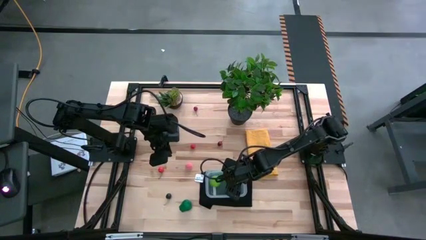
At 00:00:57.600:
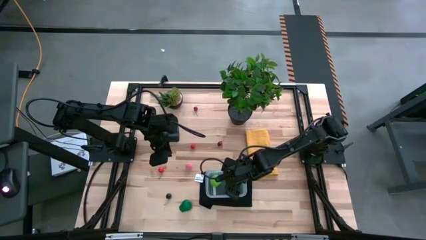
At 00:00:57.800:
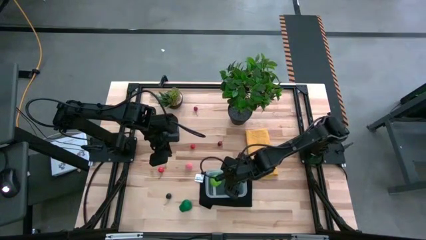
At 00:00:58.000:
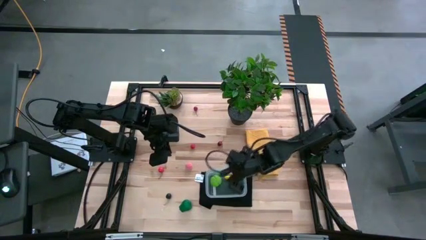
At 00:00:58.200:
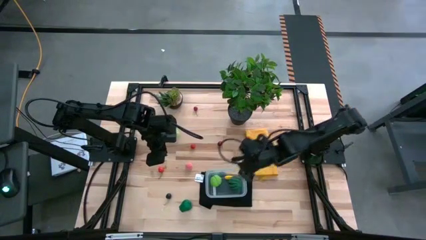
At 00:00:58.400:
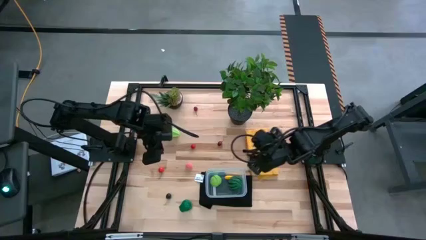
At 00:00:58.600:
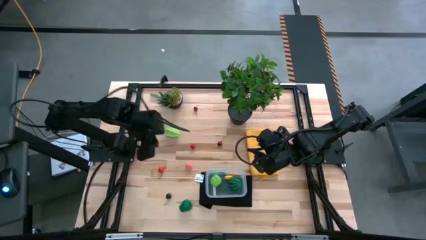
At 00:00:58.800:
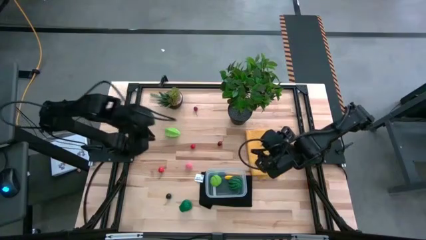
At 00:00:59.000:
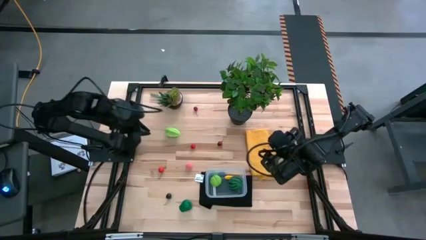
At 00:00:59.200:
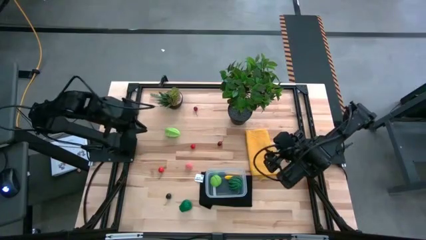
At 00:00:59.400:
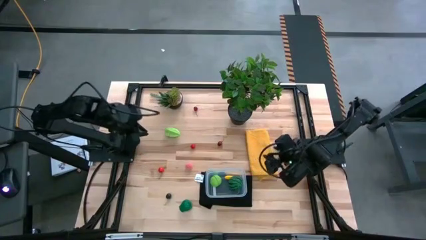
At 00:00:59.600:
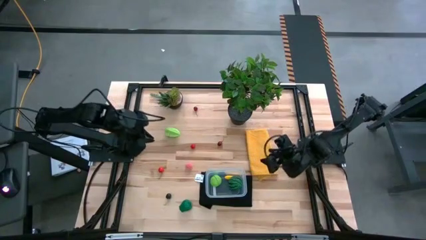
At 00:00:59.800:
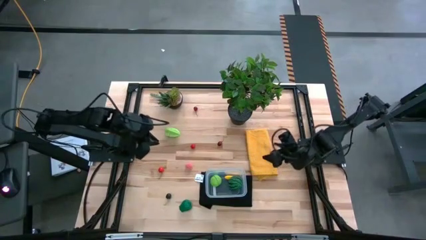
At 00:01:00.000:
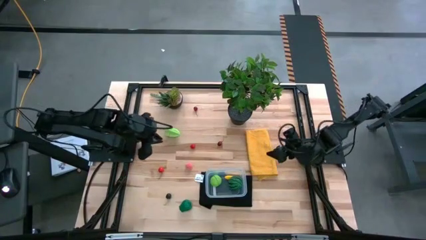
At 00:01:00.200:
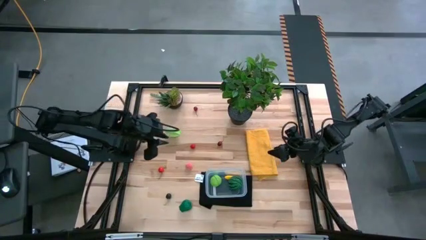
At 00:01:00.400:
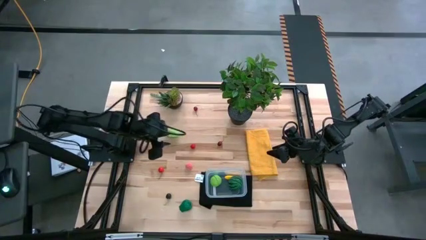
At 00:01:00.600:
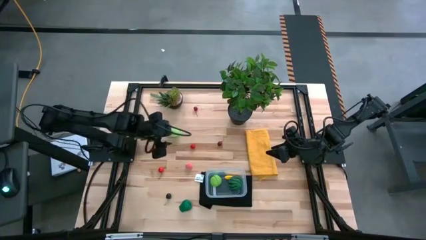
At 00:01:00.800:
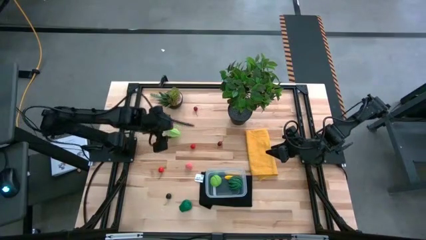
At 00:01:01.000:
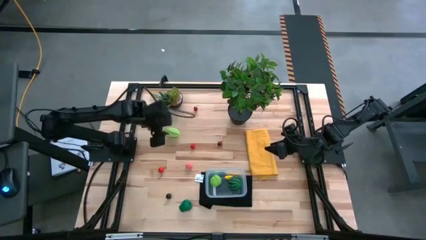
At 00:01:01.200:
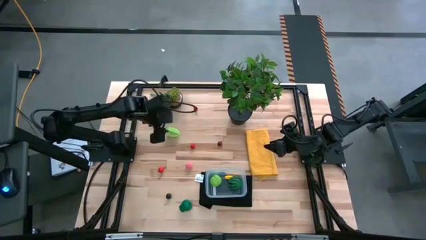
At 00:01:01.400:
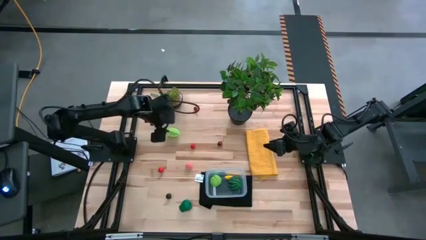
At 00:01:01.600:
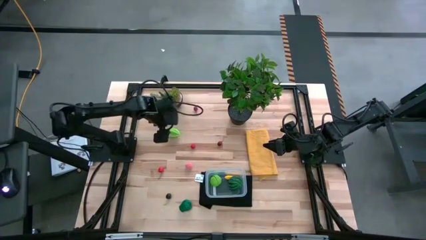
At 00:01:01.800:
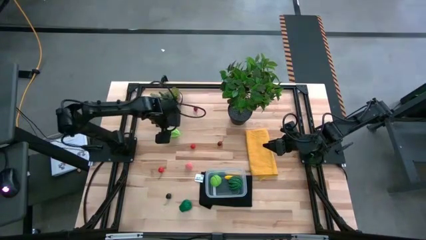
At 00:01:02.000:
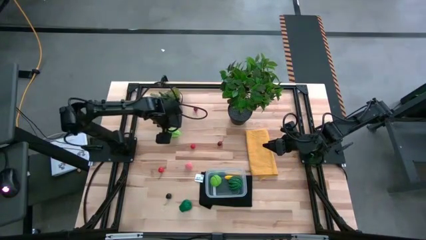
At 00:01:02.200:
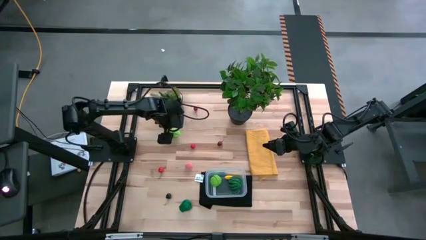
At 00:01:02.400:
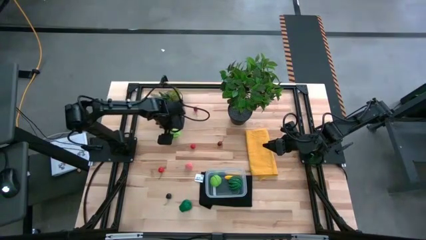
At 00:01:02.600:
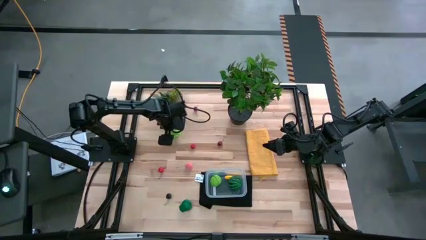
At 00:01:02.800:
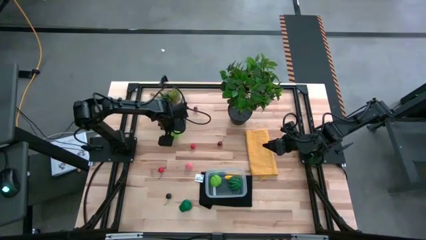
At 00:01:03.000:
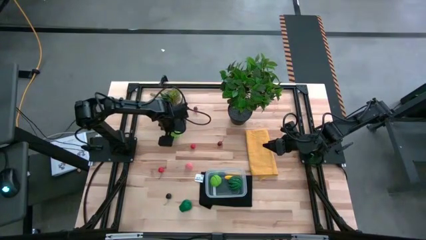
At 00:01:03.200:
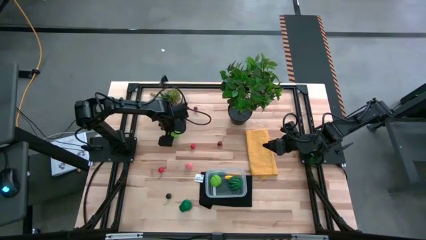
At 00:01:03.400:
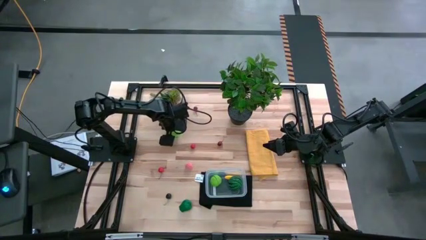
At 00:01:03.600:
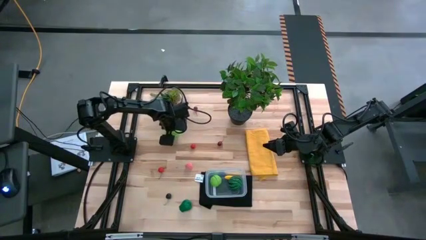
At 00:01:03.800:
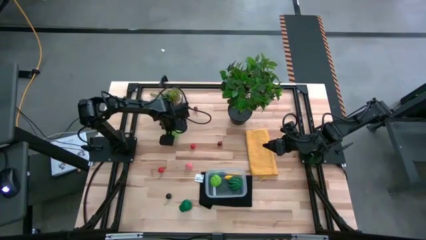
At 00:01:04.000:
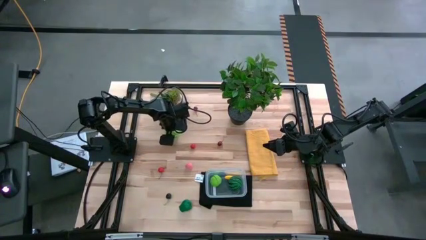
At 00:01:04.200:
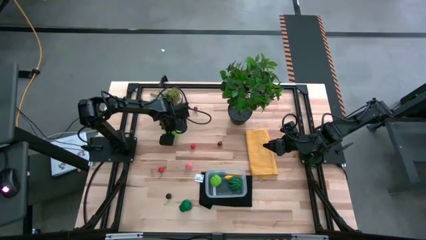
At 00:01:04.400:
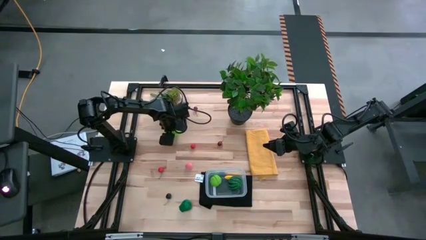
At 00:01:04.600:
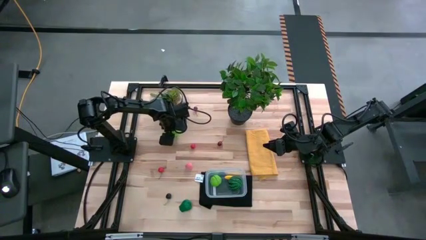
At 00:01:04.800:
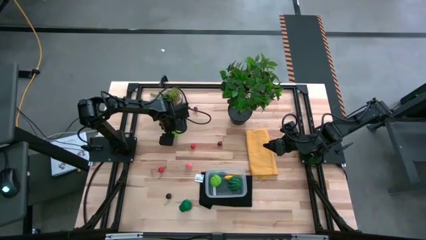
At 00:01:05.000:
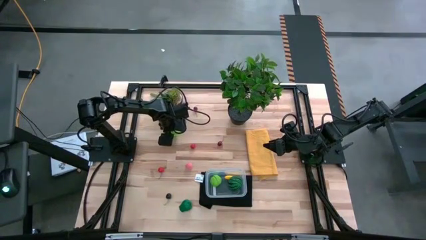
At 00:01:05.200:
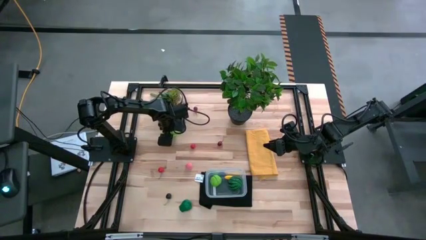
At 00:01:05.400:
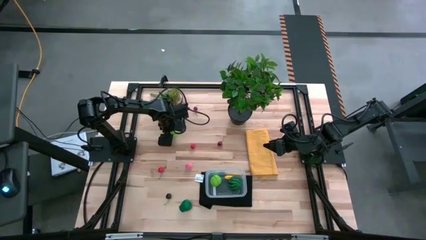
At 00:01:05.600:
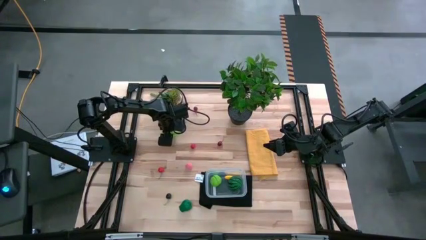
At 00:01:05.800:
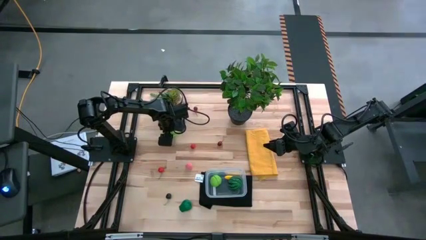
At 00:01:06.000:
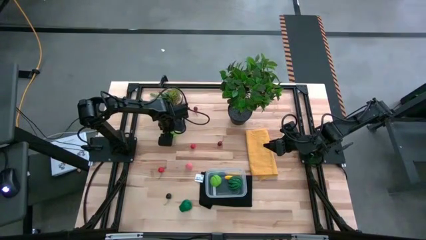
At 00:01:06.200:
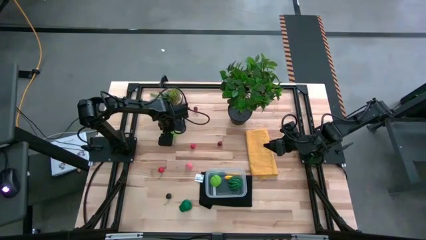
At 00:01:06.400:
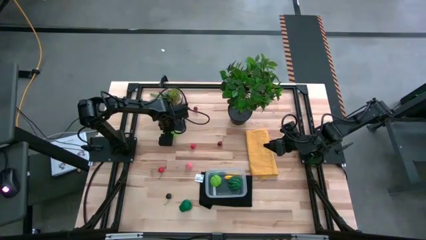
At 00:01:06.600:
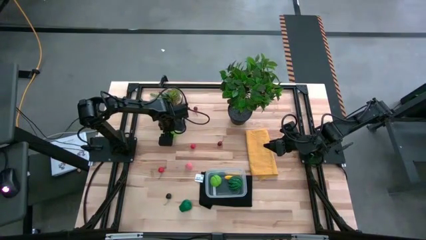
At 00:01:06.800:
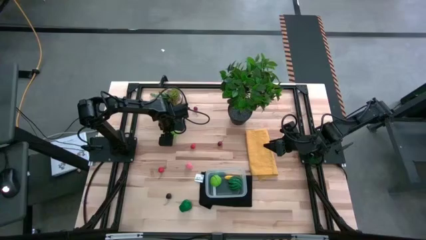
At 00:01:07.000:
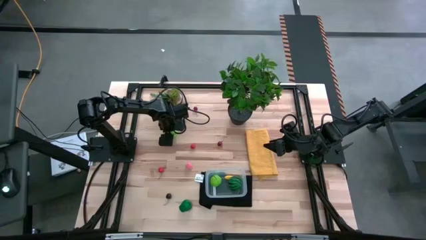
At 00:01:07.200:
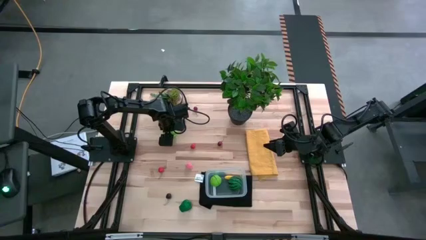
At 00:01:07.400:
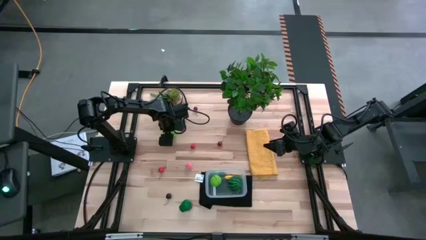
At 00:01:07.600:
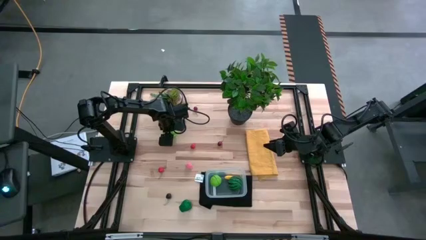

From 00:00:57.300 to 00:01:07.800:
Task: Pick and placing Produce into tupperware
Put the star fruit into the transparent bin

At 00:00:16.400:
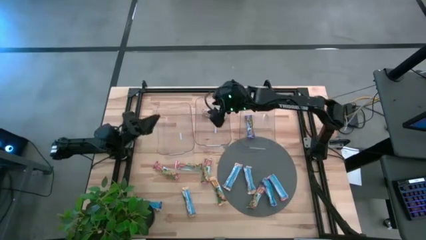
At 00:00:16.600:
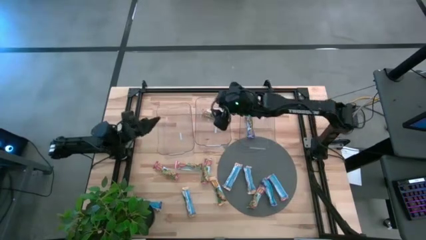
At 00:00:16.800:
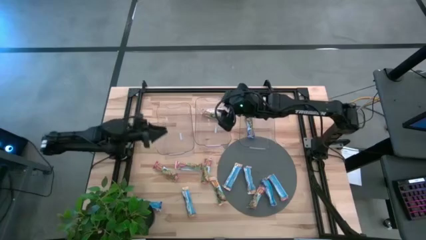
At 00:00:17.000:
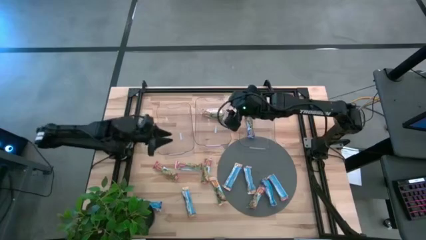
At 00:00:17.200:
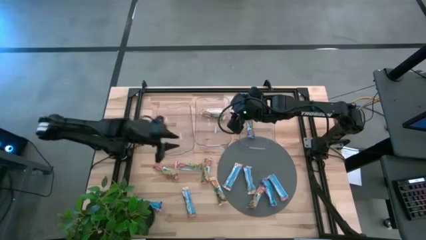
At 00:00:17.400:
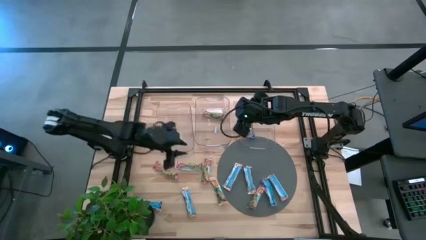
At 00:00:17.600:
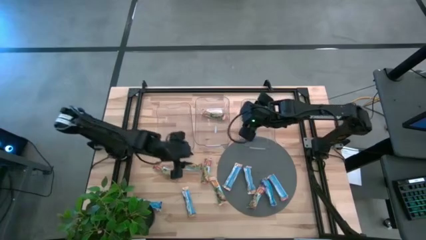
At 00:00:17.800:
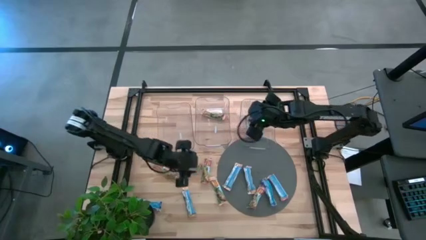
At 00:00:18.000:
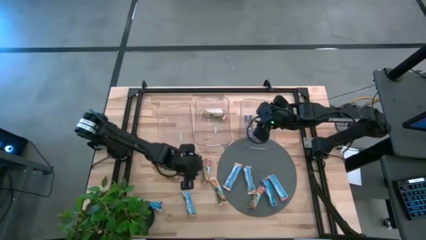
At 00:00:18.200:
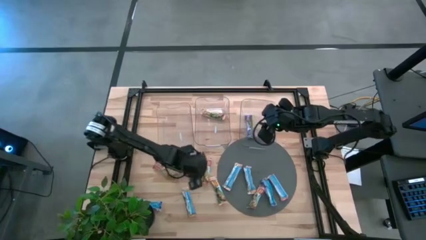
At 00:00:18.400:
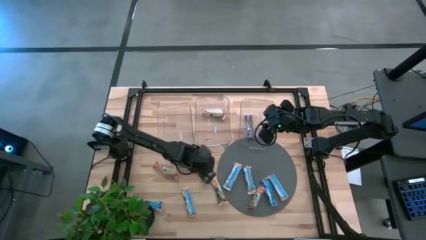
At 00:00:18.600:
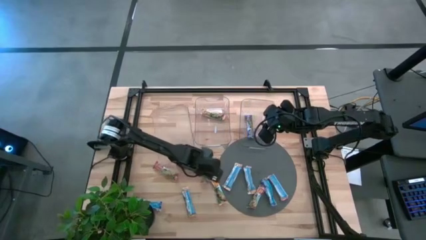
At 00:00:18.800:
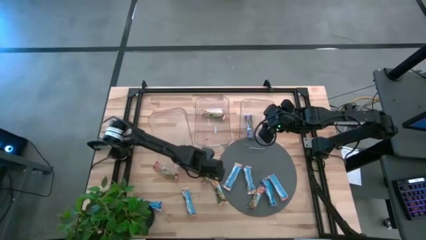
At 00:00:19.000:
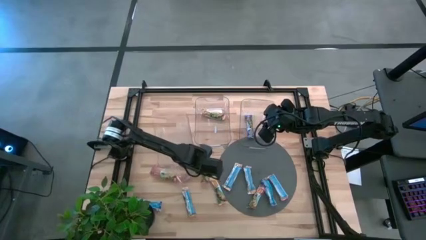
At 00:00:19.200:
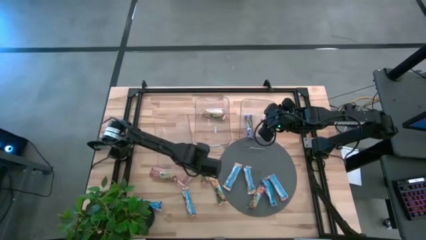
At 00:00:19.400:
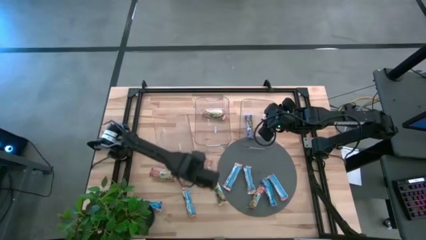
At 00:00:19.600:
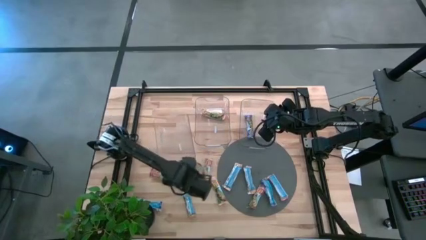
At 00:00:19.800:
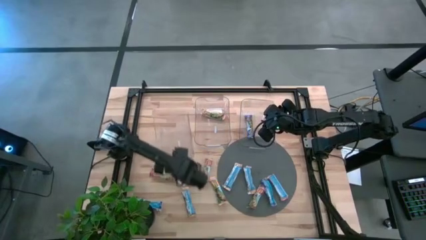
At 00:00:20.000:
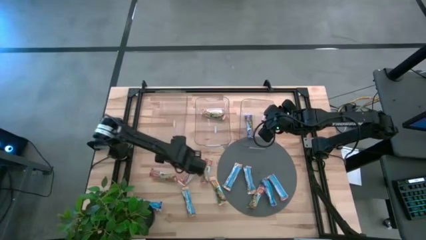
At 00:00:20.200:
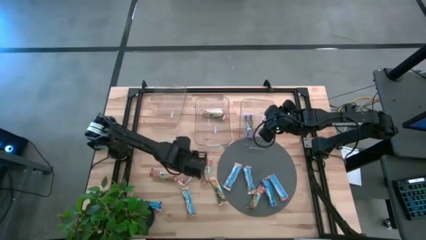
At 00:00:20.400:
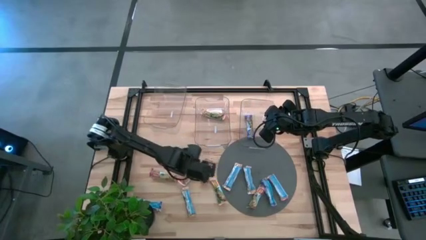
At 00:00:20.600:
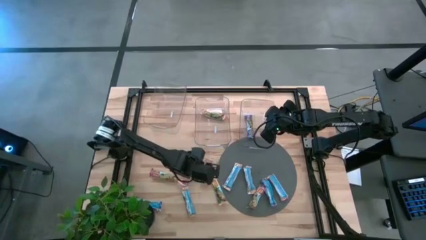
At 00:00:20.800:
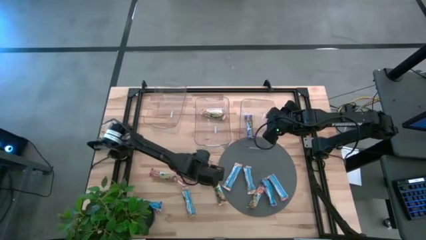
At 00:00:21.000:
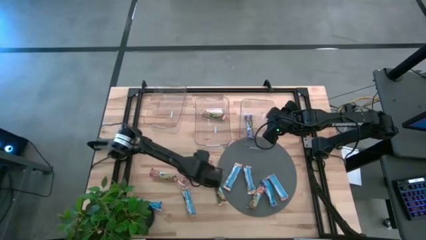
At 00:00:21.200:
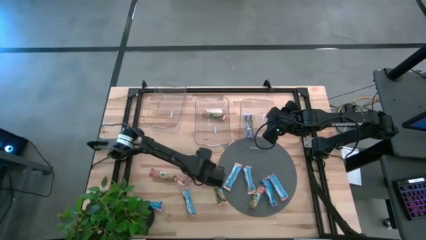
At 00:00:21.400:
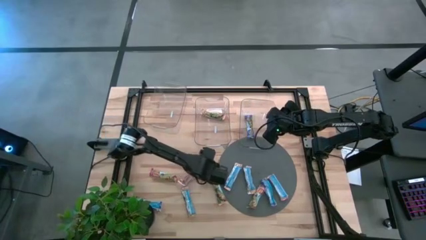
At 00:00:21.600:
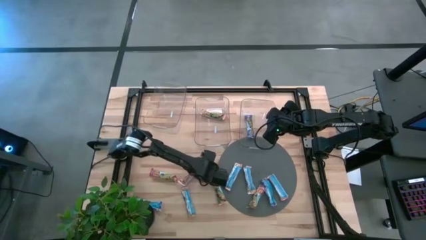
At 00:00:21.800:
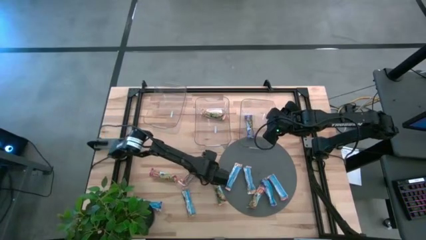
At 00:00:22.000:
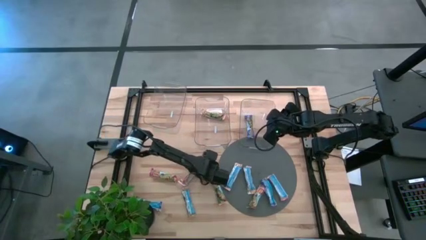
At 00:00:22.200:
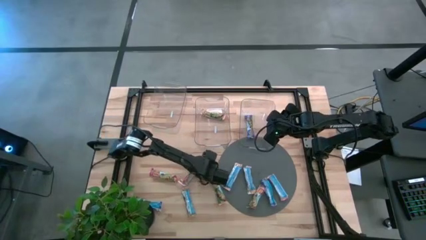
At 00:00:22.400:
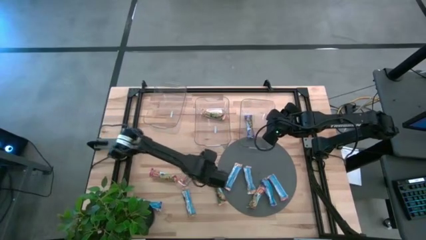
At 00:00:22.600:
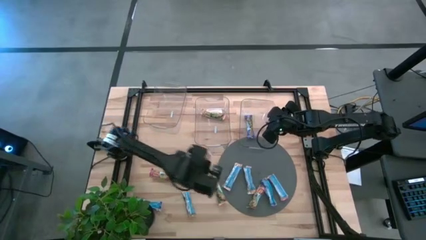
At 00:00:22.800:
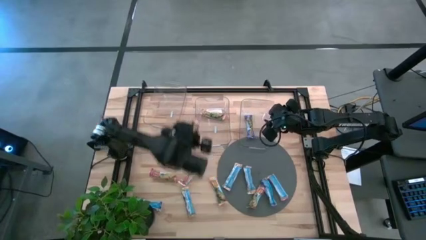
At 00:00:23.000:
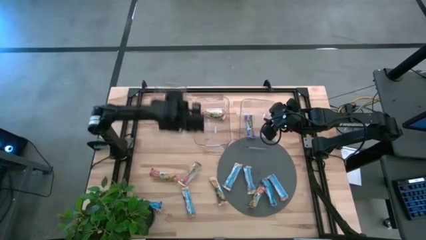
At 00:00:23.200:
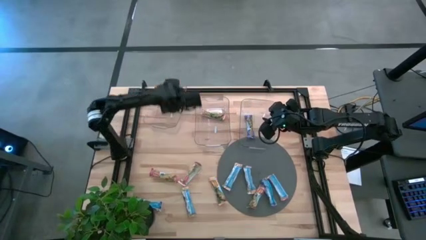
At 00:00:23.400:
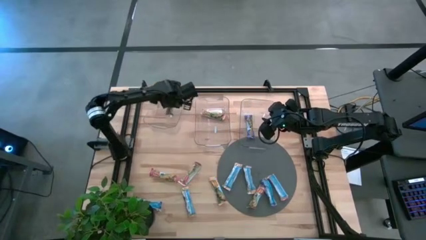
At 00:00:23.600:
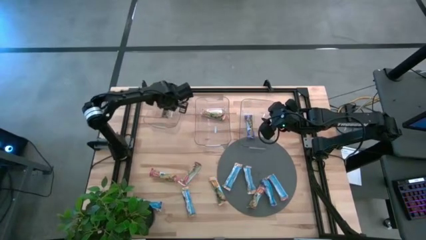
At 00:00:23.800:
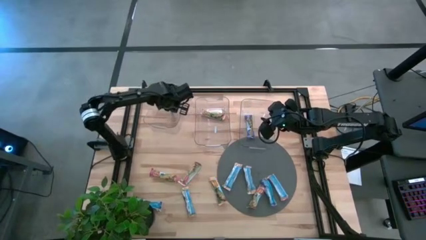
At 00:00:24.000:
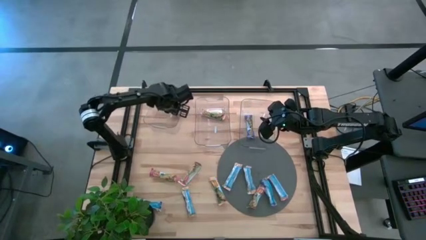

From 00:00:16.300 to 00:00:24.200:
Task: Pick and place Granola Bars by type
Put the red snack bar into the left transparent bin
